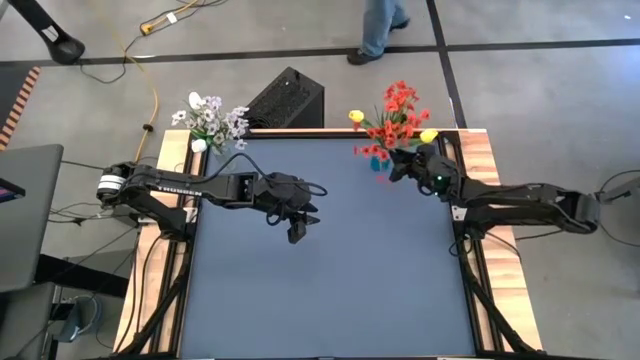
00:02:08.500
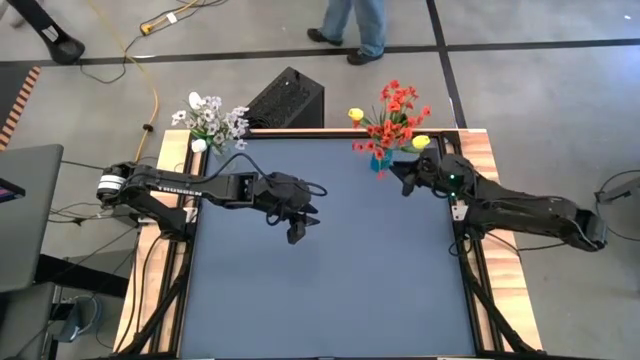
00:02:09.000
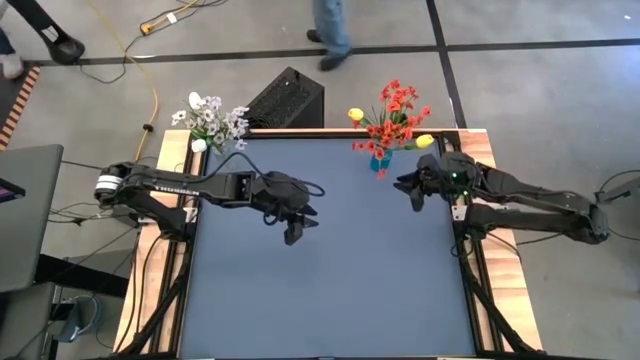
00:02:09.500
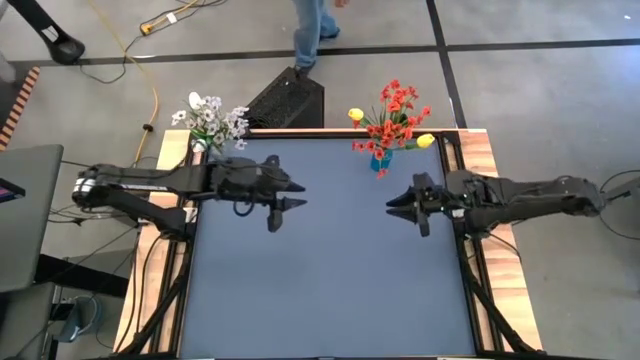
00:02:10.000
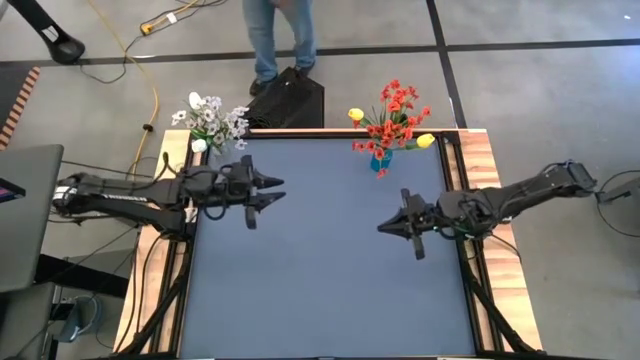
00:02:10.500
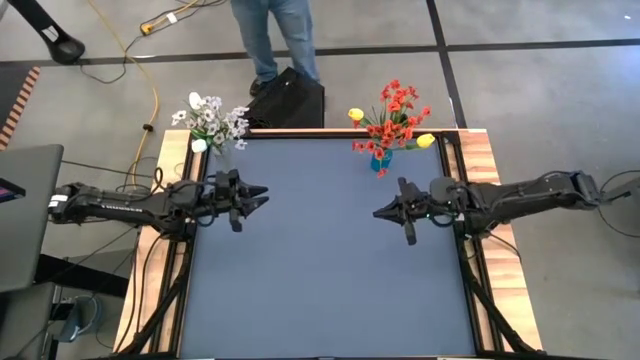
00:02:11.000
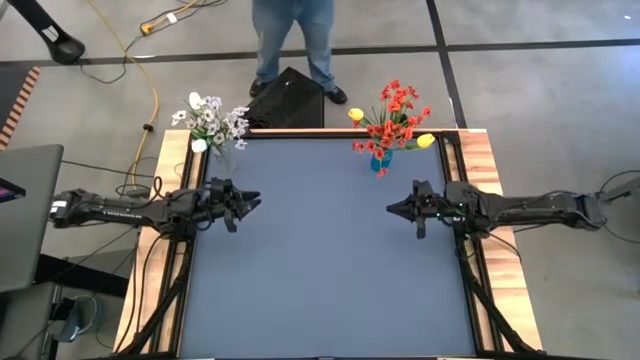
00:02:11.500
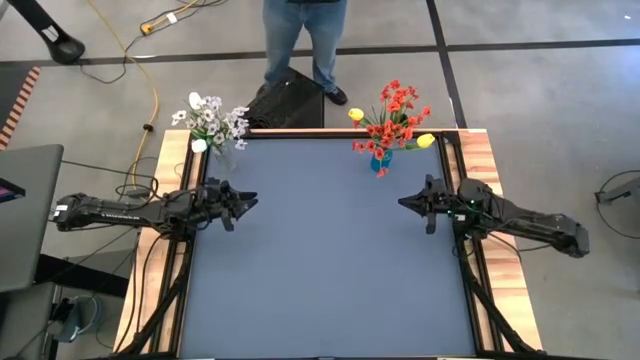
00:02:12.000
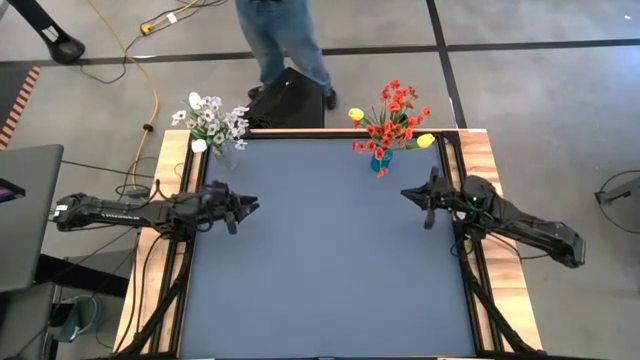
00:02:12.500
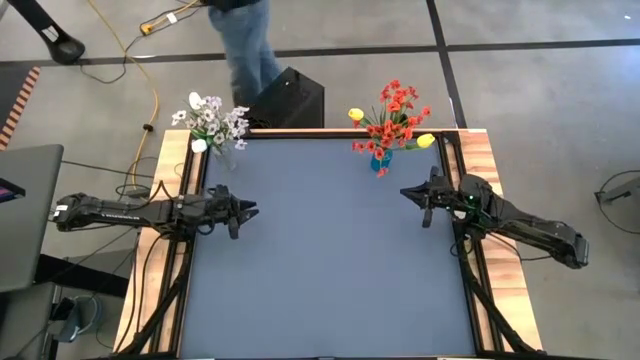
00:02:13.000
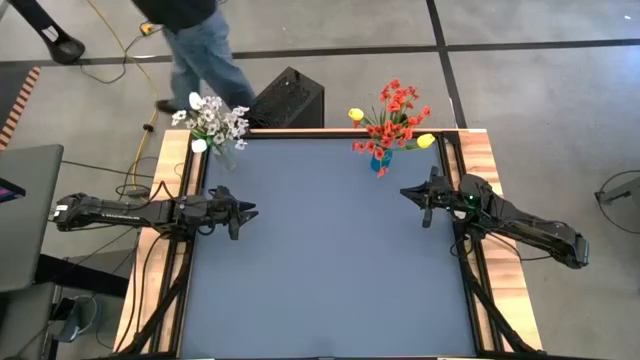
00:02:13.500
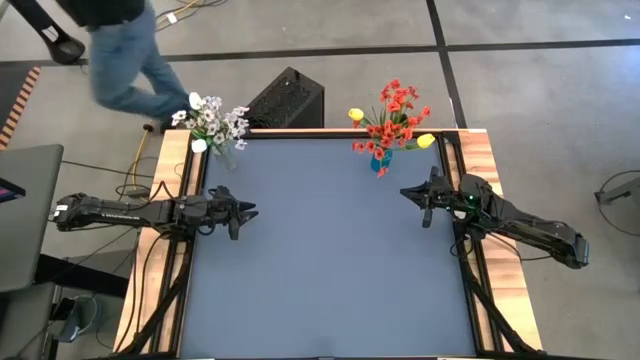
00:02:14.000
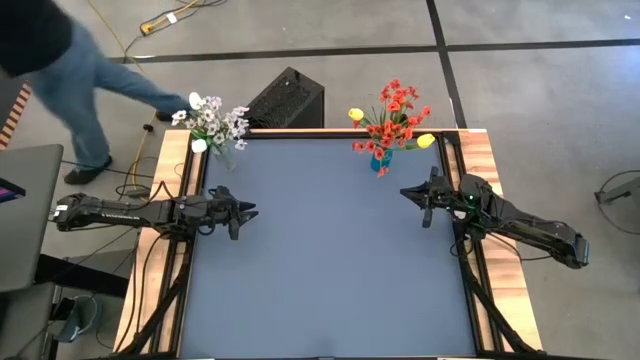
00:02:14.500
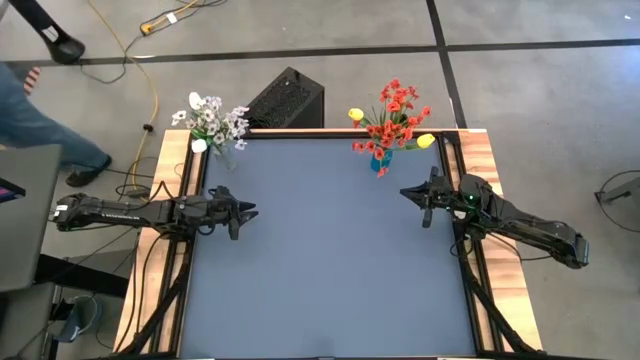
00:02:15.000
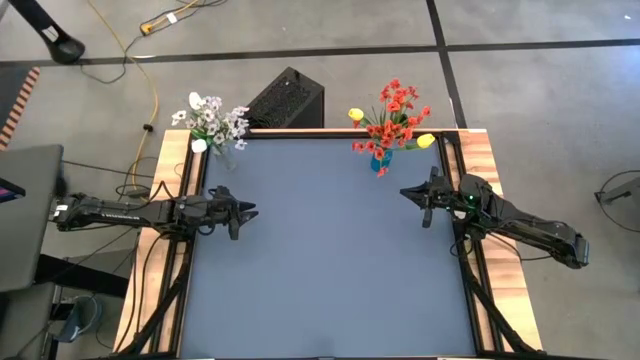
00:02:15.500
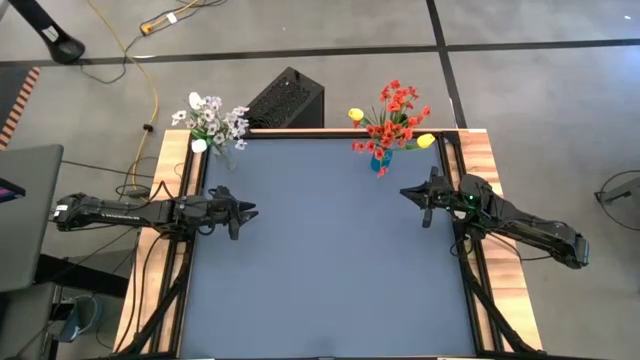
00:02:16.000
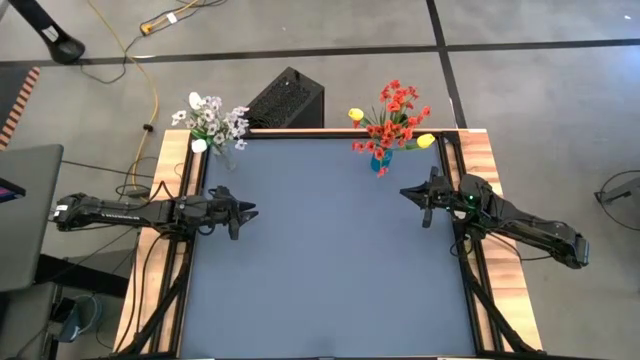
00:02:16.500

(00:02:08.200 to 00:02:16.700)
Task: Sort flowers into vase by color
Return to Home Position

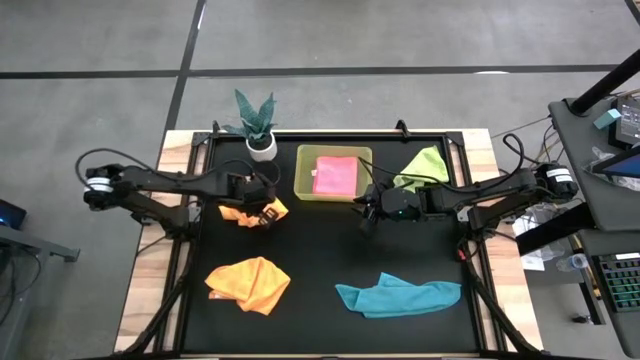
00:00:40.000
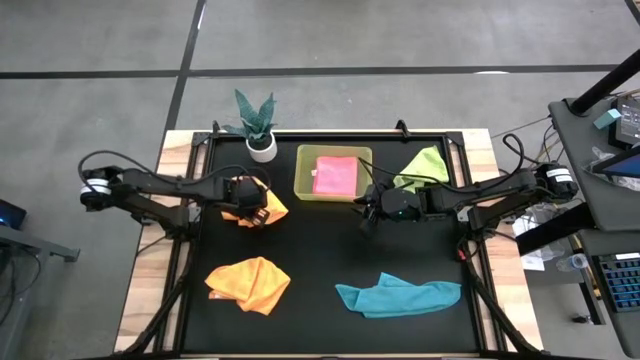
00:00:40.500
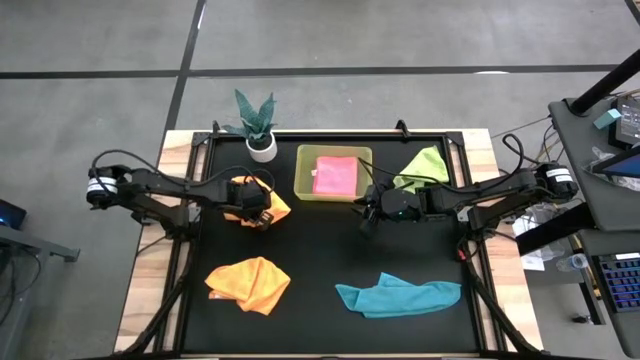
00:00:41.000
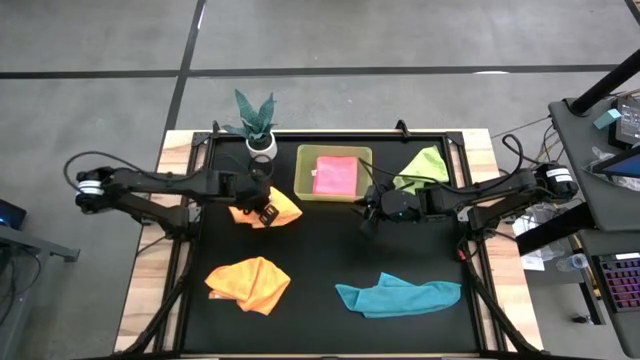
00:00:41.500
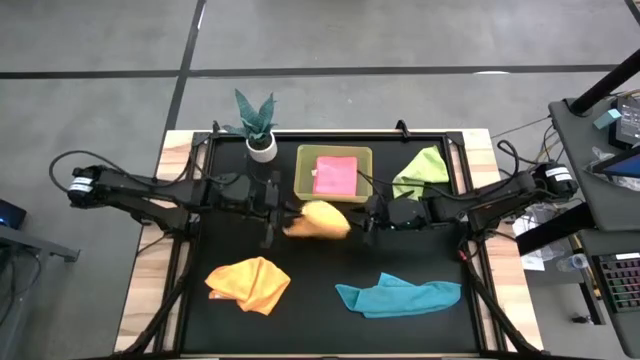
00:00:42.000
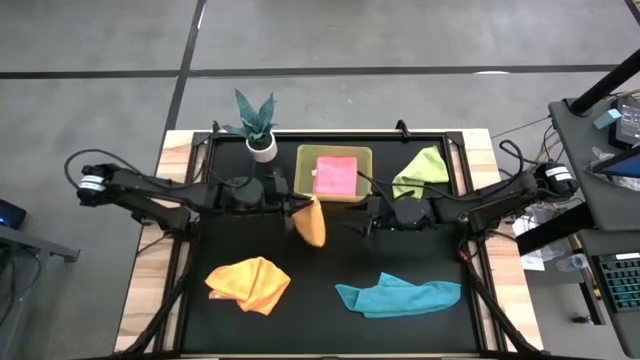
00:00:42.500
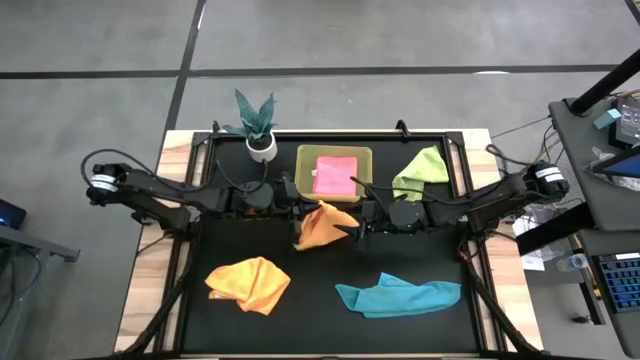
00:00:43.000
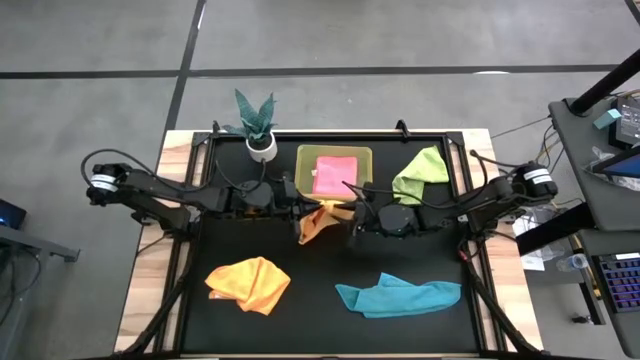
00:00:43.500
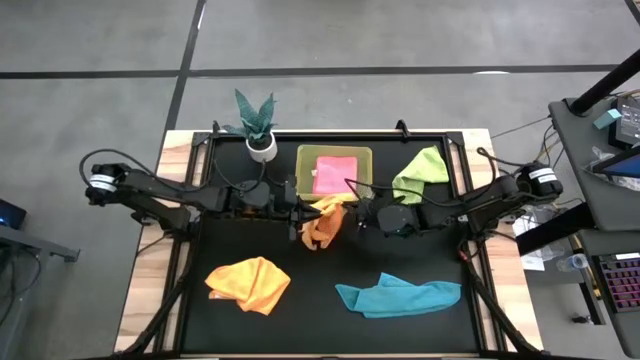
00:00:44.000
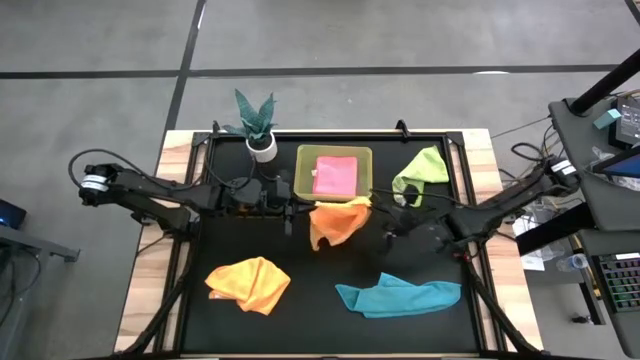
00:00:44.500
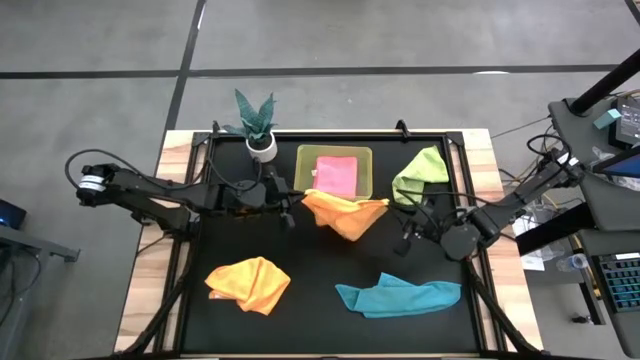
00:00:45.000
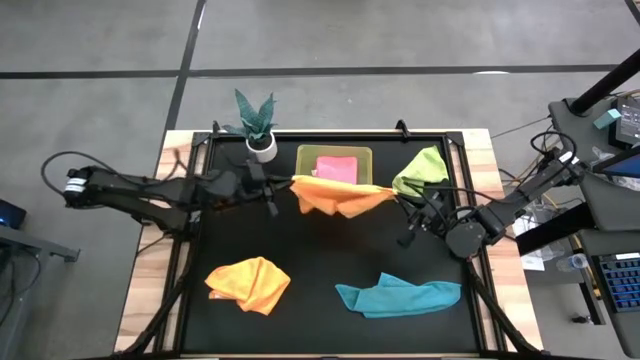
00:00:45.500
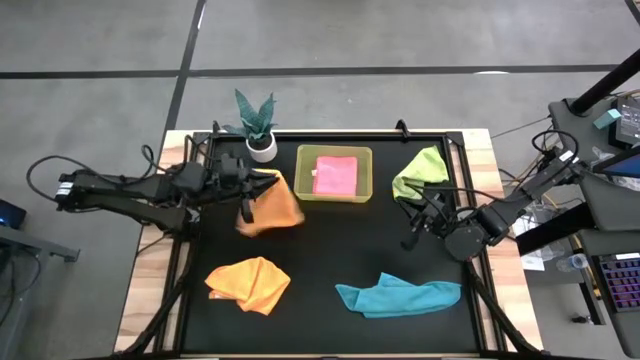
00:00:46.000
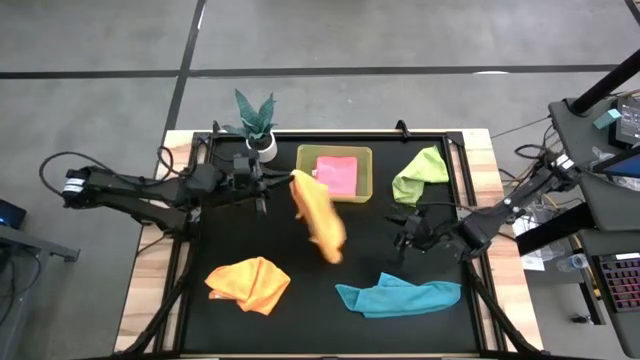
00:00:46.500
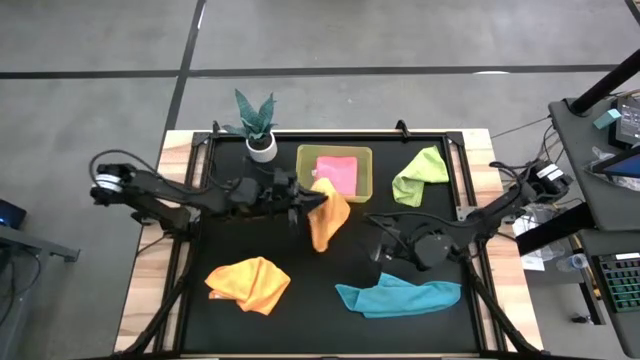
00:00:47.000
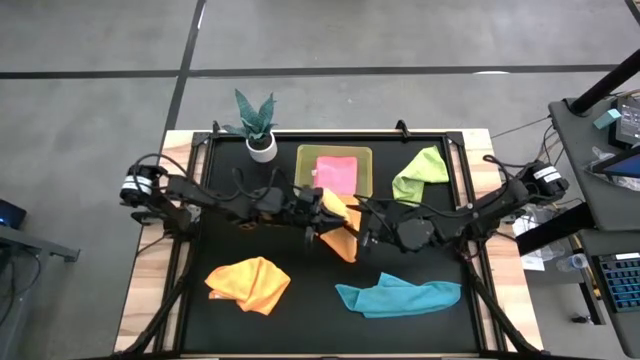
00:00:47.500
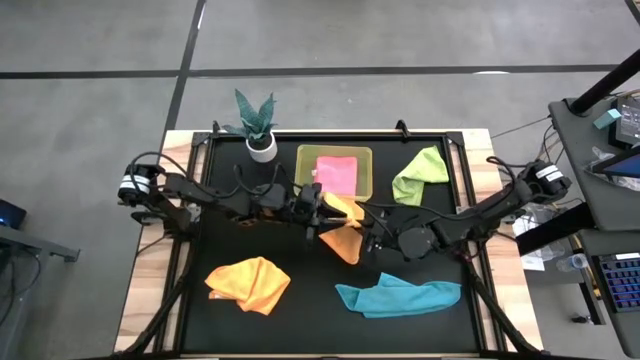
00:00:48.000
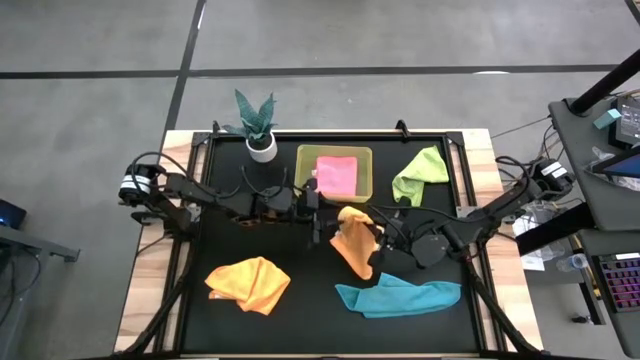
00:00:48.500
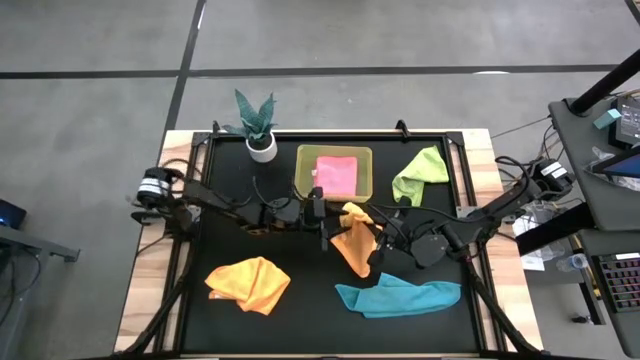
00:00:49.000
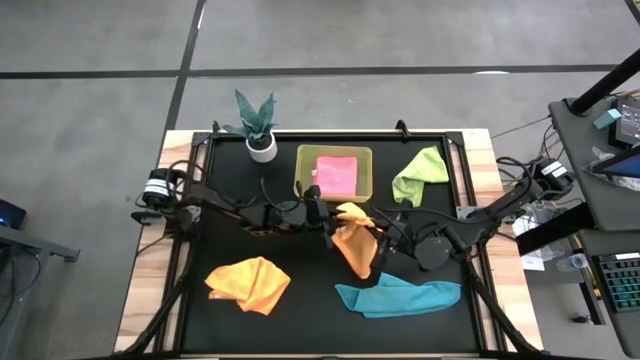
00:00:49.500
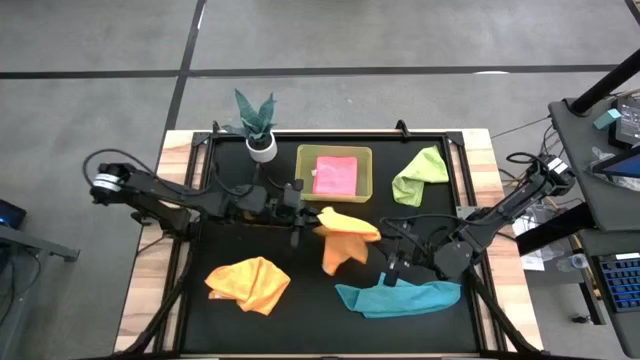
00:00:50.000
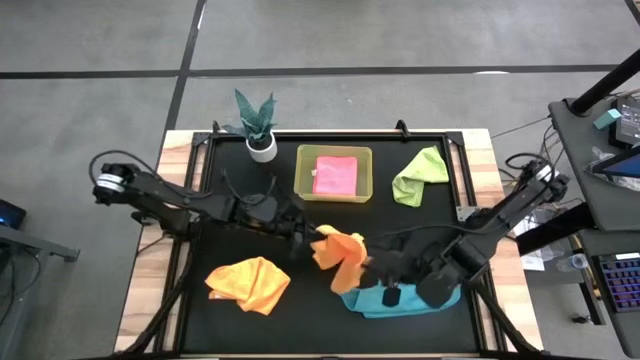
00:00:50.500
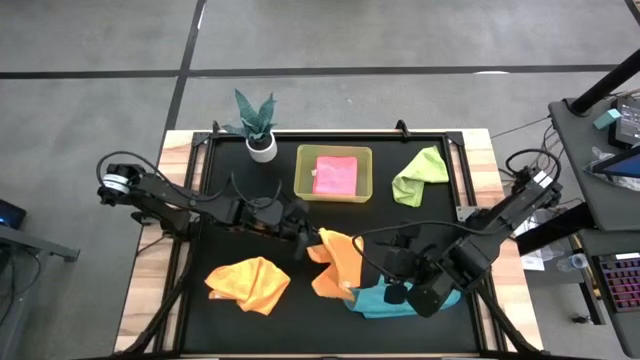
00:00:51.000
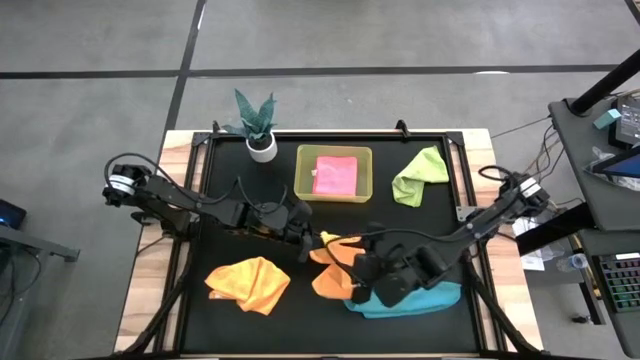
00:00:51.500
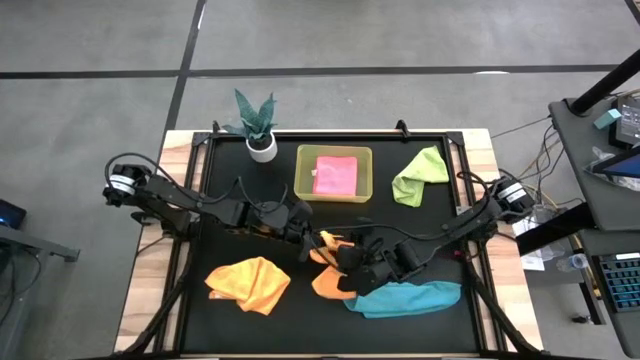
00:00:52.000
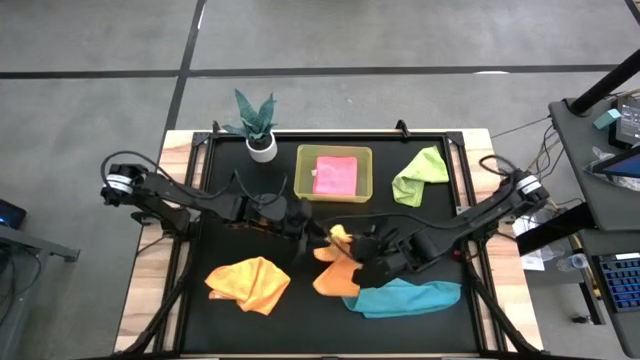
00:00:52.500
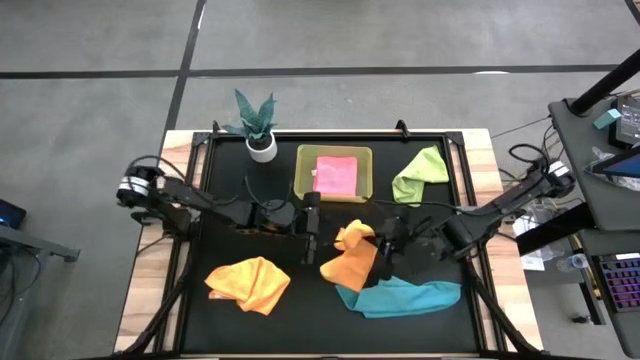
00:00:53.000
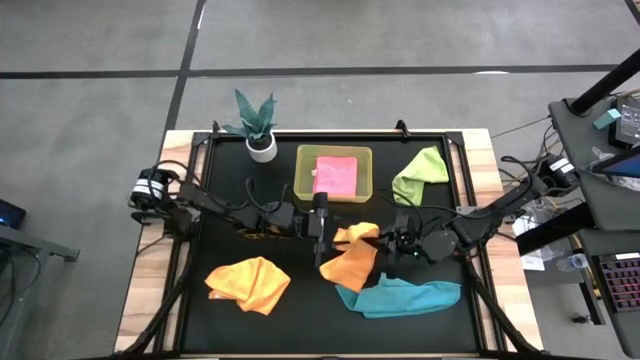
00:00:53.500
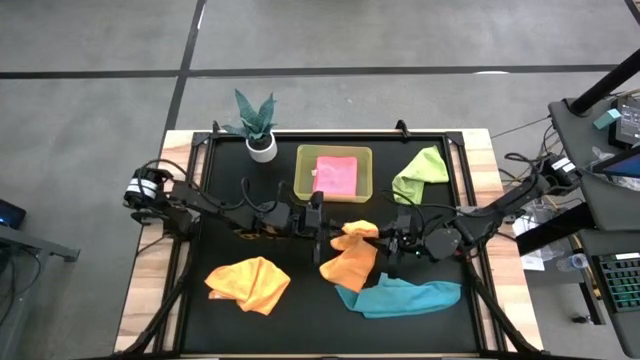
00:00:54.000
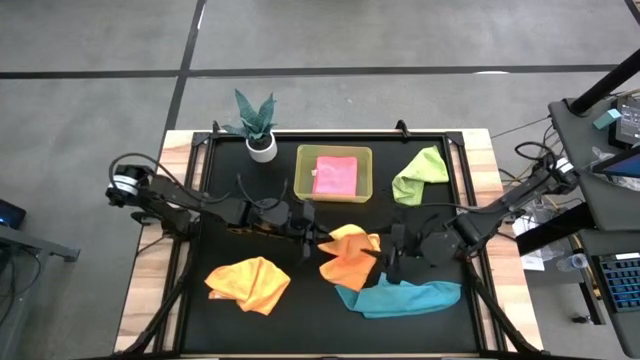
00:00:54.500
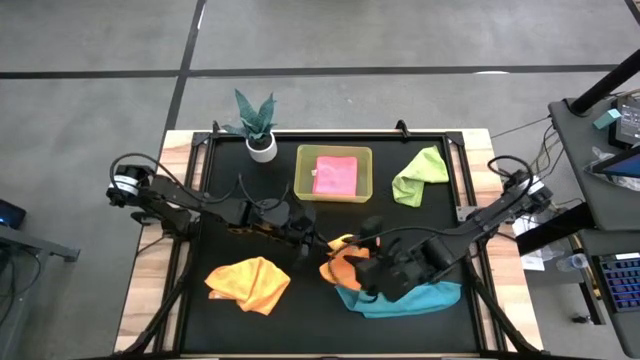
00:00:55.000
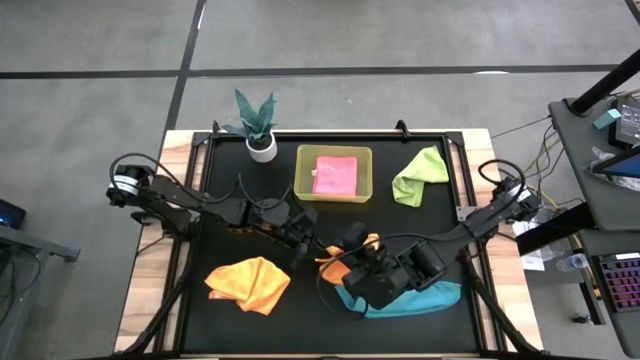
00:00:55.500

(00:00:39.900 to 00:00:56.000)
Task: Fold microfiber towels
Fold the top yellow towel on the table
